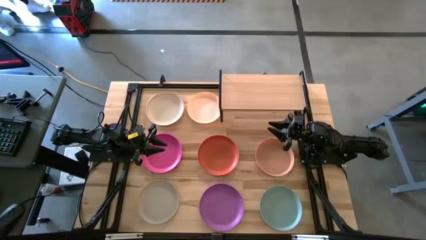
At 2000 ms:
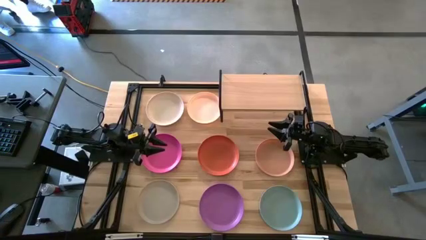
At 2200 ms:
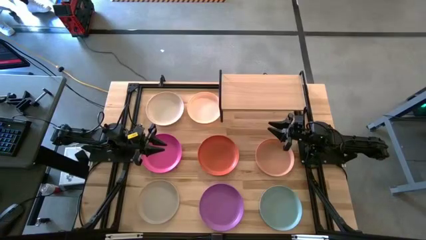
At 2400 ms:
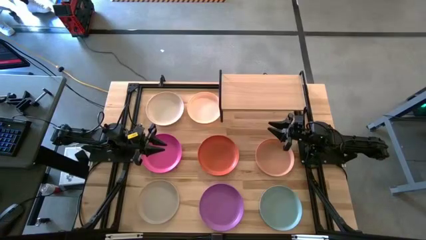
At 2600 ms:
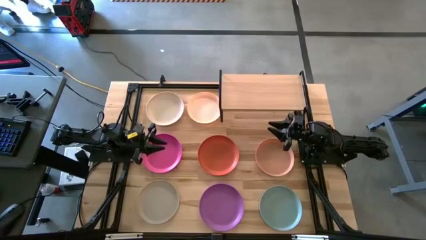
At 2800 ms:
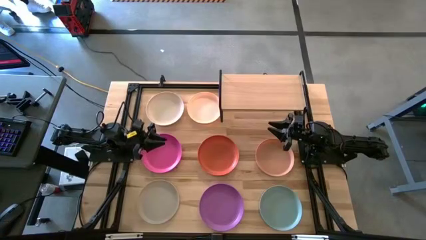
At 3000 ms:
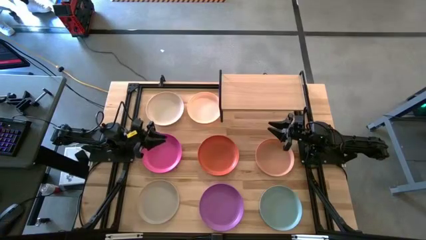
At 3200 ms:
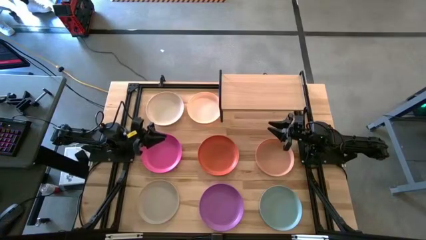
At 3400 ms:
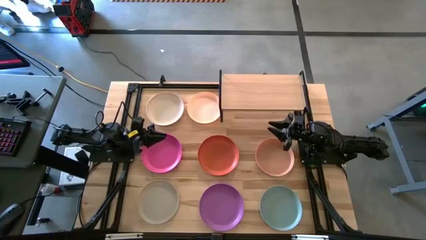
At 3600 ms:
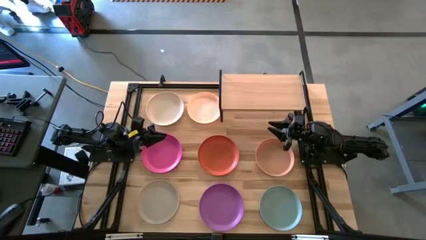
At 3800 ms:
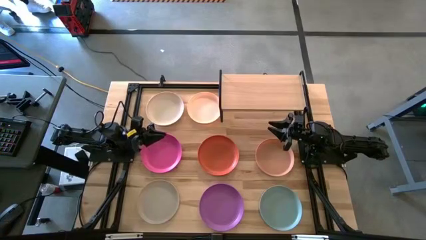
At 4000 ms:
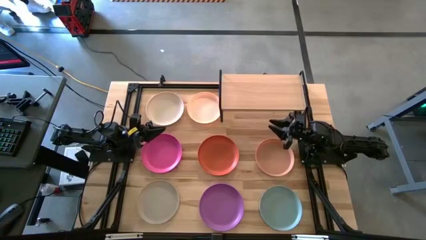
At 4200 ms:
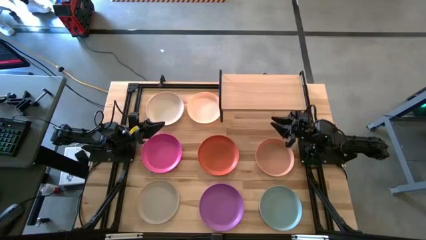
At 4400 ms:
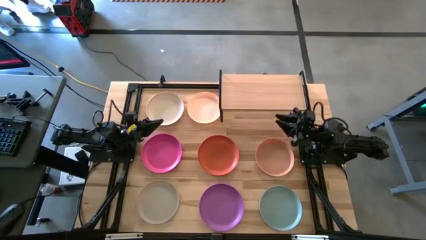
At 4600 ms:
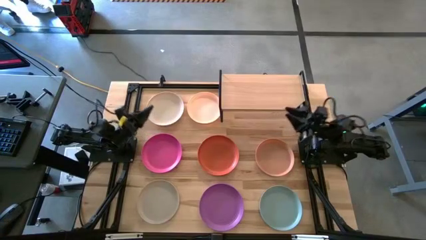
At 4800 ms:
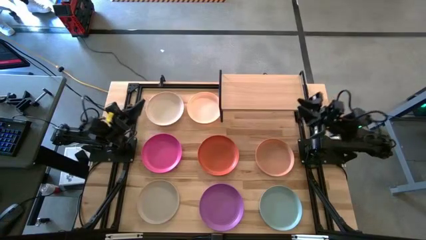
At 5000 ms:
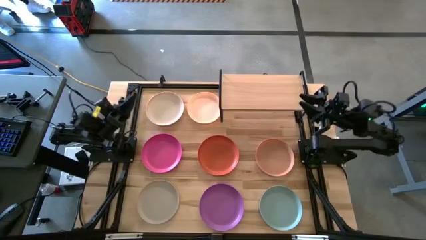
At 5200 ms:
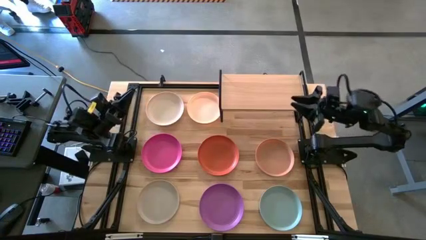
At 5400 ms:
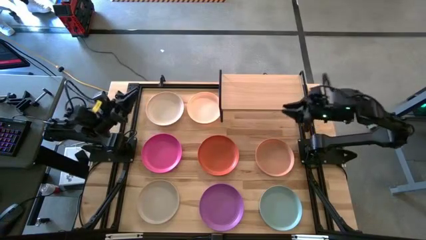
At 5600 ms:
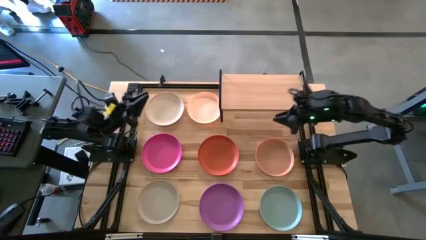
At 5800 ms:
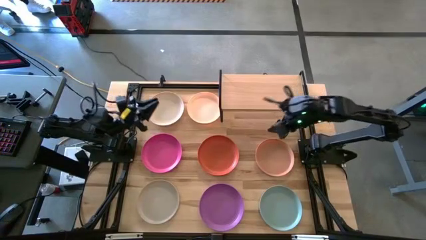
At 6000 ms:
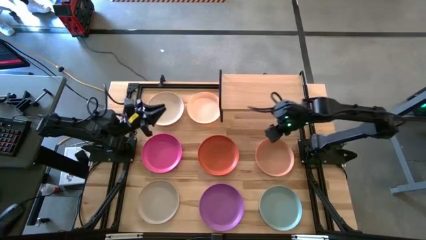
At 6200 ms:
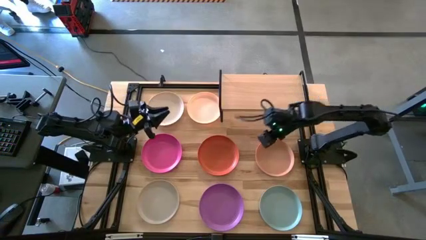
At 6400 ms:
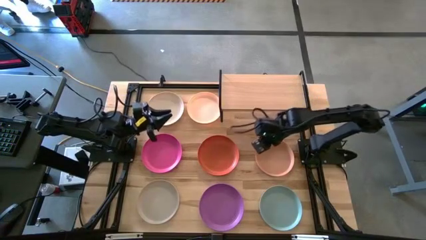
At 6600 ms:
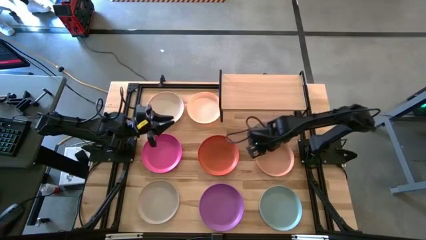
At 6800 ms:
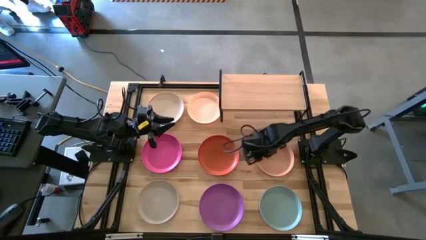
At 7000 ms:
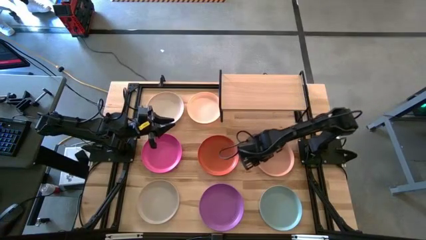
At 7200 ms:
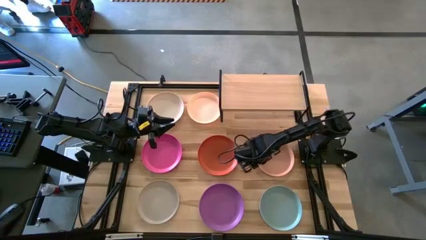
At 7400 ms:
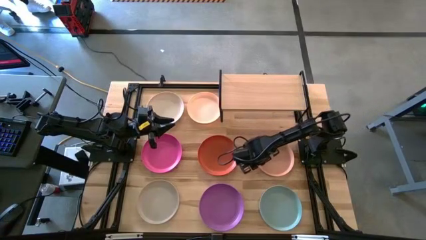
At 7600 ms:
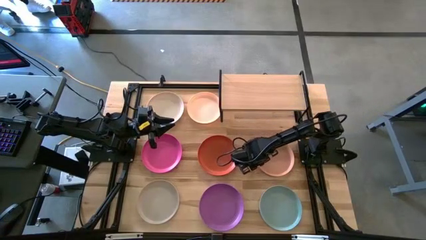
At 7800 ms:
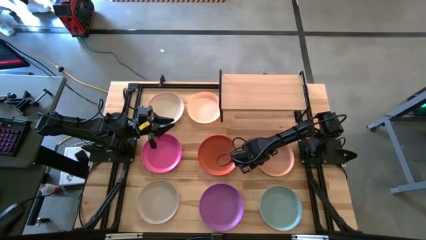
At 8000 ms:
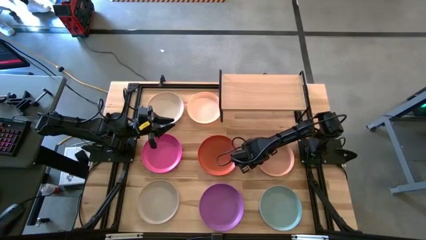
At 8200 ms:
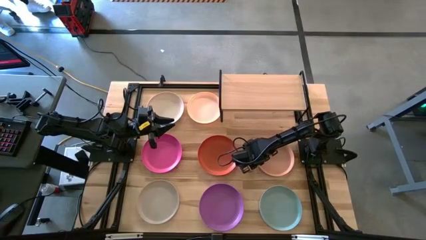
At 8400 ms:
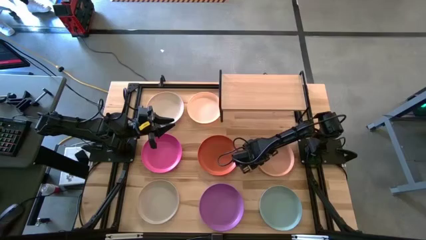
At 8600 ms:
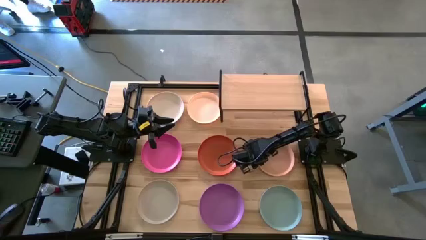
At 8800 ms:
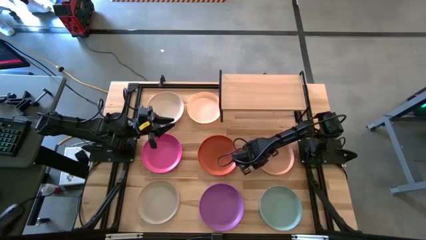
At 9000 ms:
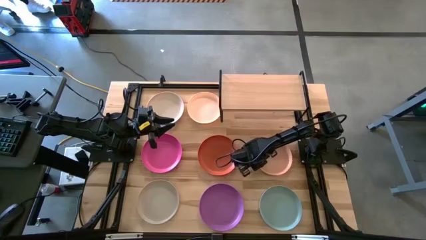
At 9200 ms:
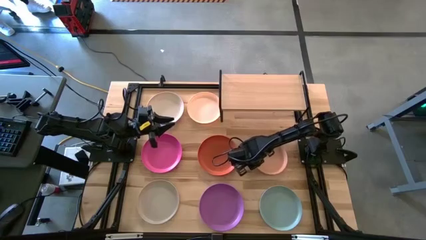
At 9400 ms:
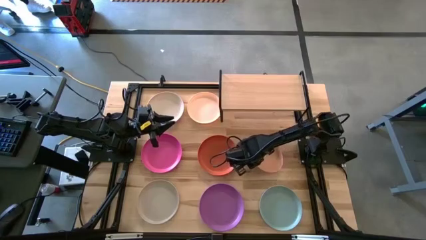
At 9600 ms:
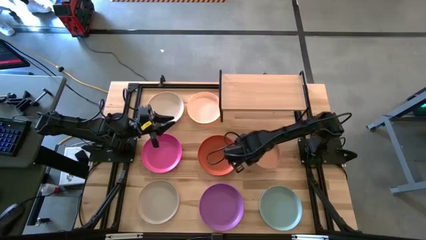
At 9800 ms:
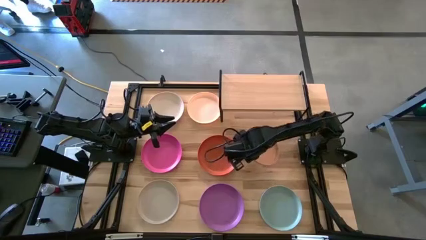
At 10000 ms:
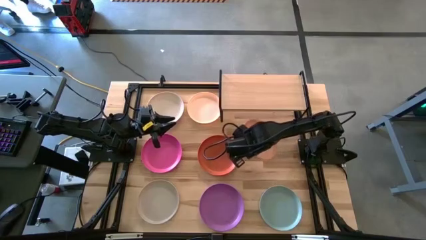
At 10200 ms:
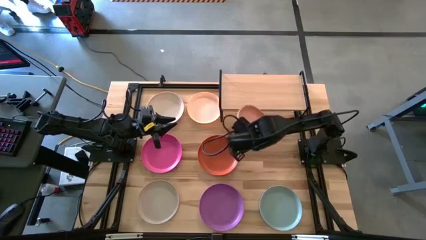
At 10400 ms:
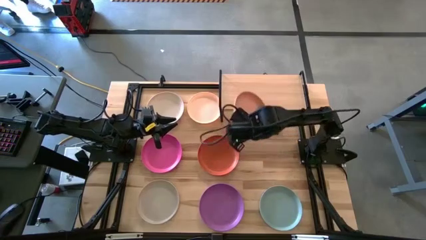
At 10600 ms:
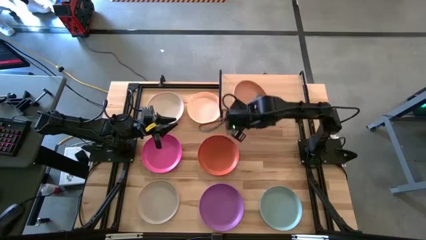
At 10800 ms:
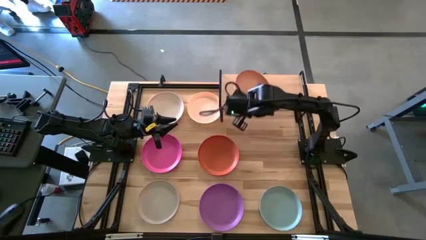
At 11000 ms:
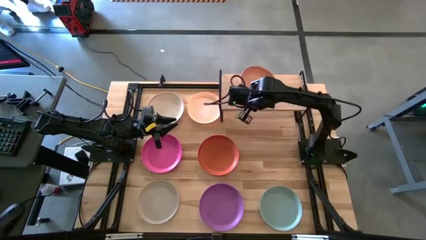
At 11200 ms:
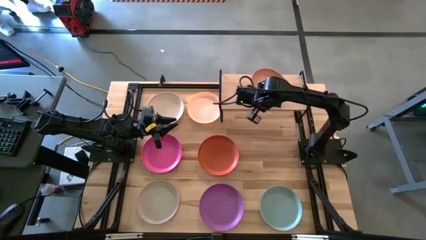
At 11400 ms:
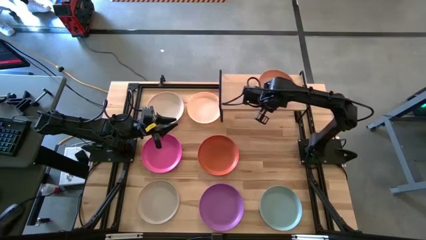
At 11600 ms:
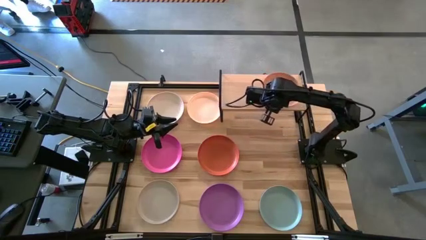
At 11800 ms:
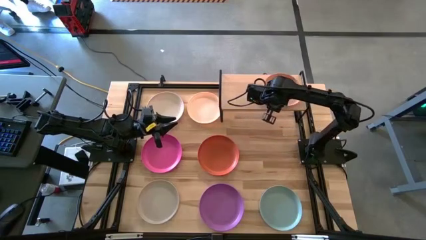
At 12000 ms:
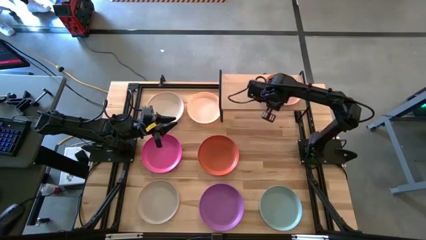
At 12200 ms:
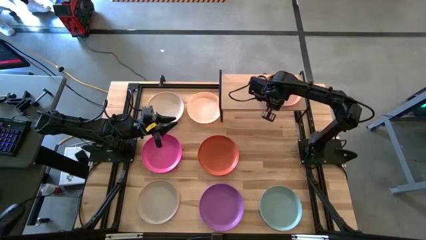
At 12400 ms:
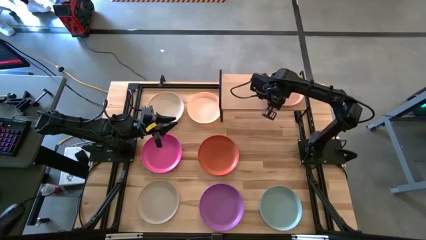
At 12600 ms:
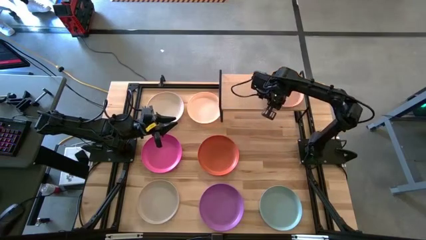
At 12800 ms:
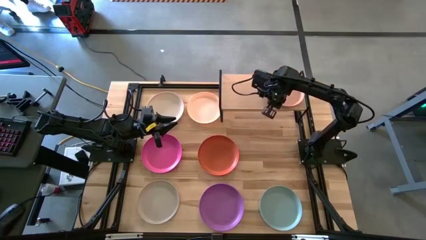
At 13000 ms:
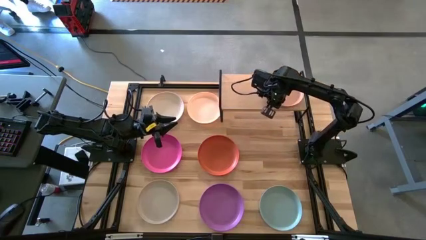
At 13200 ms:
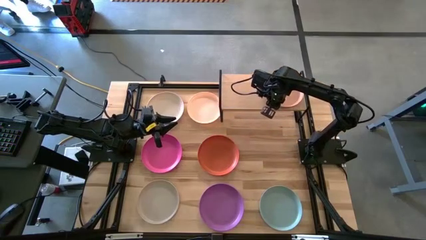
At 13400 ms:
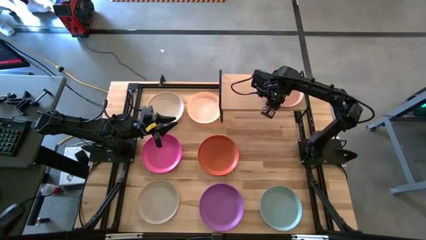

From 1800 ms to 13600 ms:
Task: Place and stack plates onto a shelf
Put the light orange plate on the shelf
